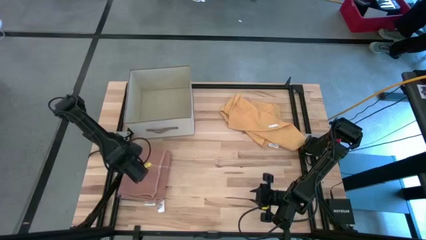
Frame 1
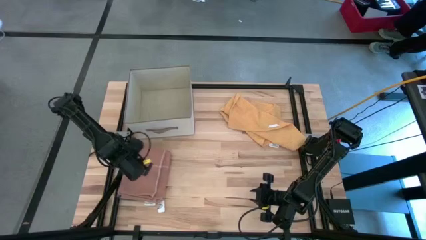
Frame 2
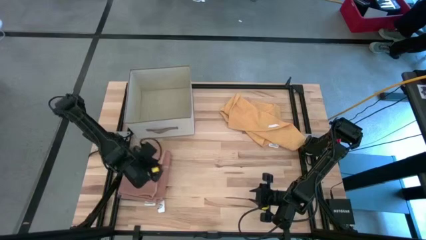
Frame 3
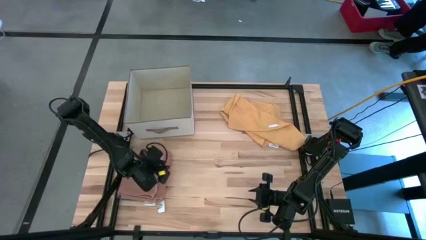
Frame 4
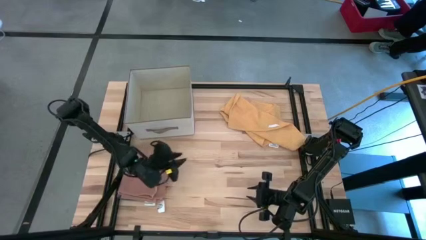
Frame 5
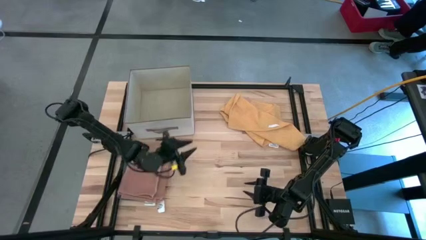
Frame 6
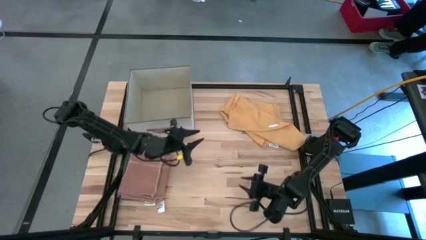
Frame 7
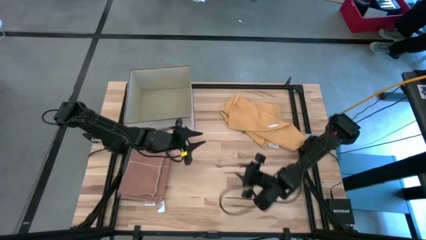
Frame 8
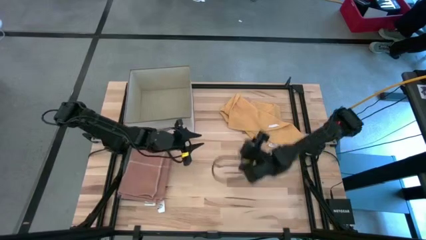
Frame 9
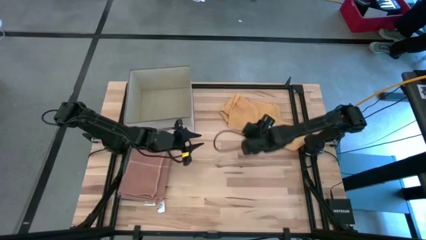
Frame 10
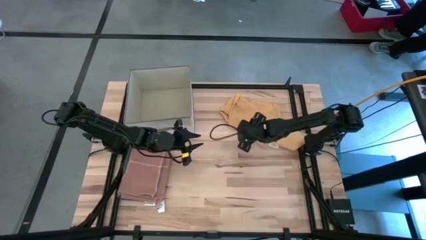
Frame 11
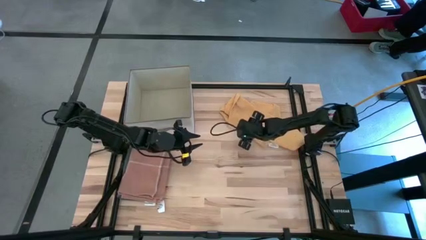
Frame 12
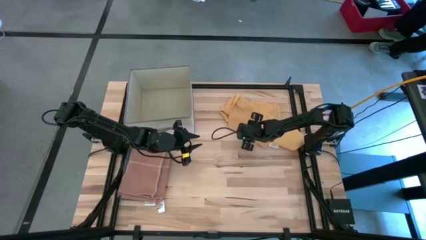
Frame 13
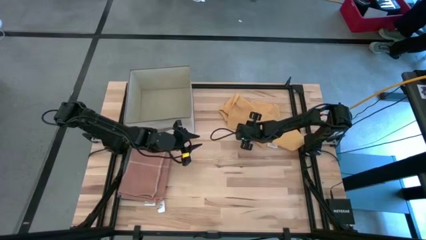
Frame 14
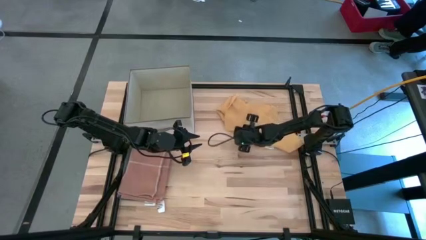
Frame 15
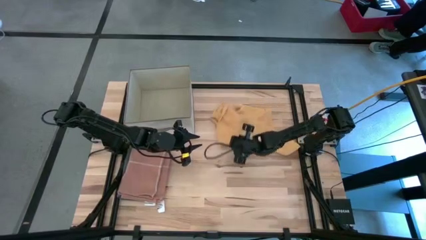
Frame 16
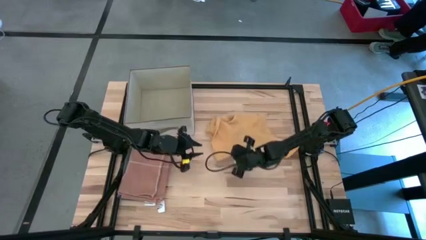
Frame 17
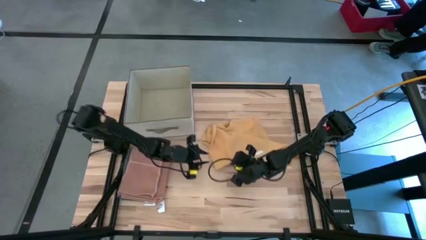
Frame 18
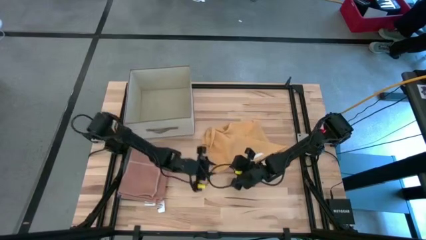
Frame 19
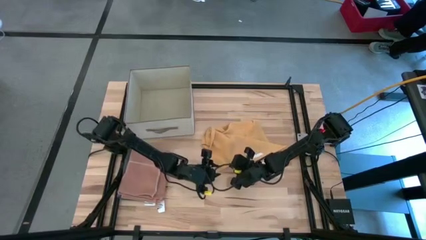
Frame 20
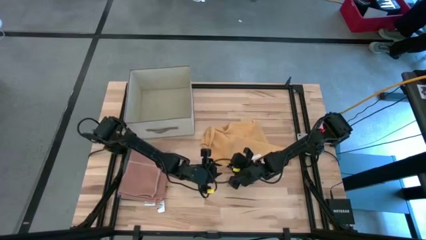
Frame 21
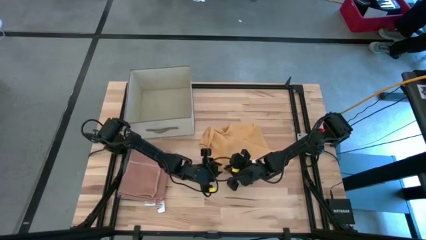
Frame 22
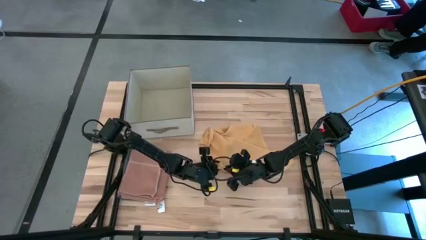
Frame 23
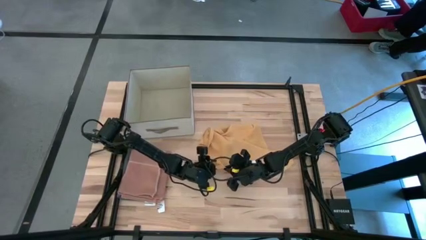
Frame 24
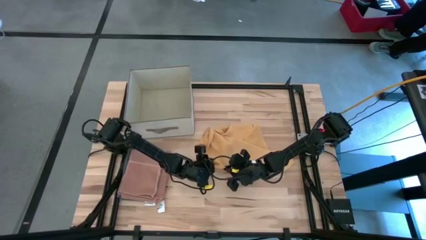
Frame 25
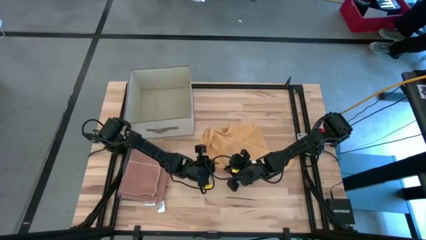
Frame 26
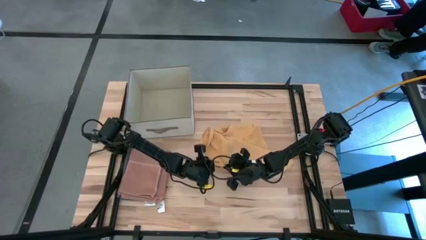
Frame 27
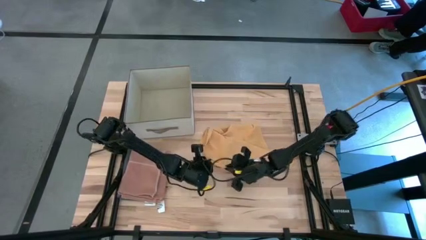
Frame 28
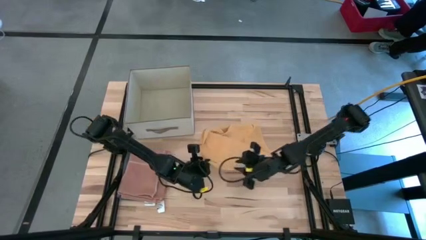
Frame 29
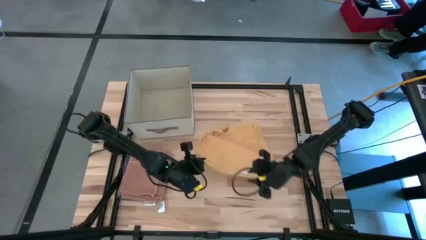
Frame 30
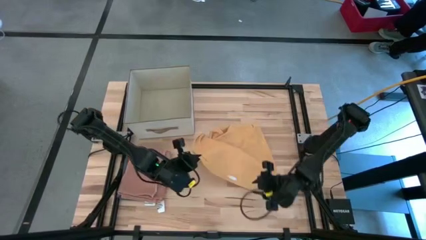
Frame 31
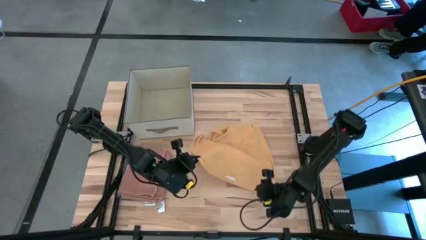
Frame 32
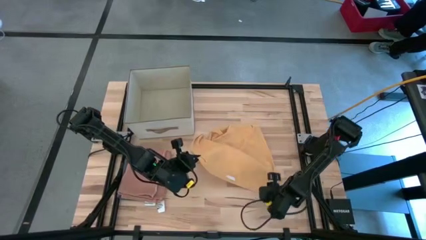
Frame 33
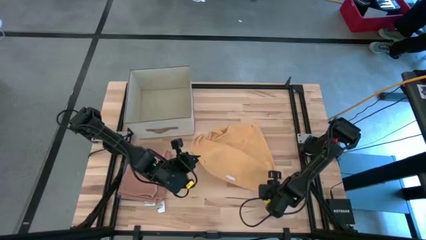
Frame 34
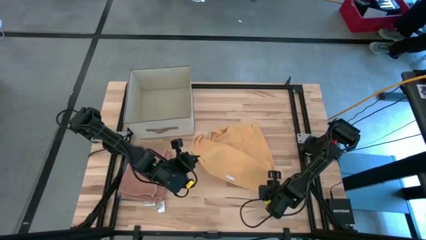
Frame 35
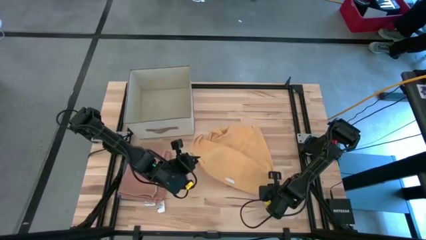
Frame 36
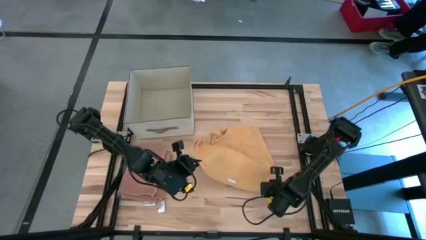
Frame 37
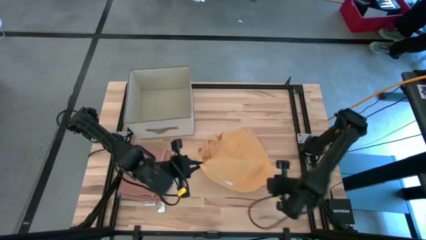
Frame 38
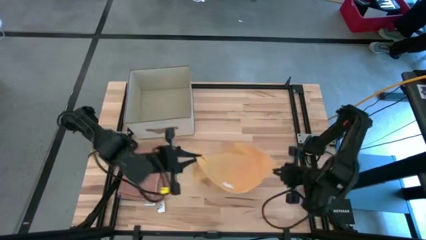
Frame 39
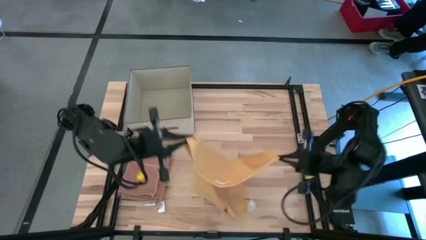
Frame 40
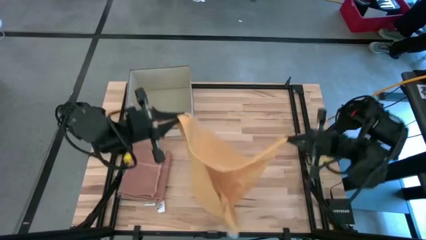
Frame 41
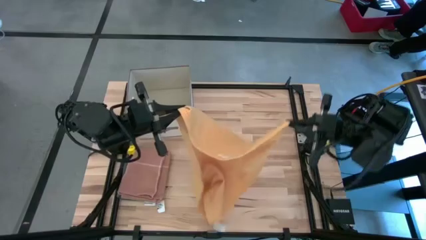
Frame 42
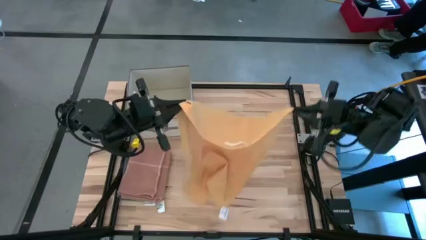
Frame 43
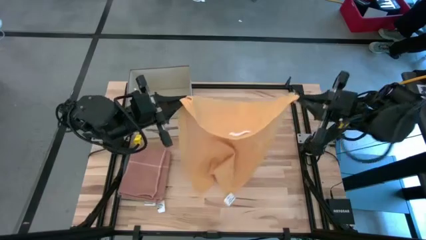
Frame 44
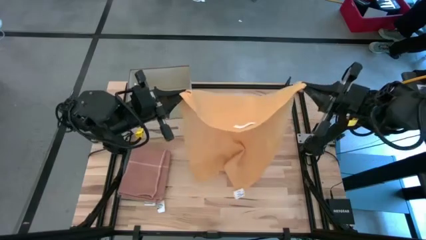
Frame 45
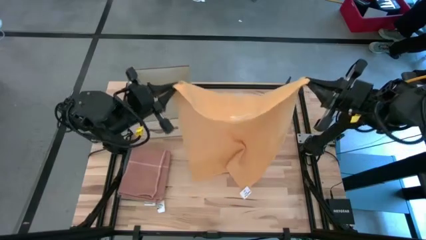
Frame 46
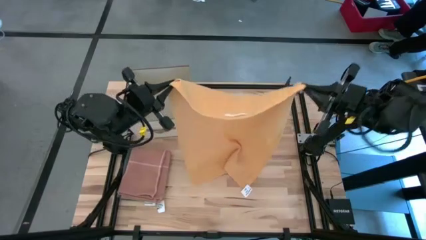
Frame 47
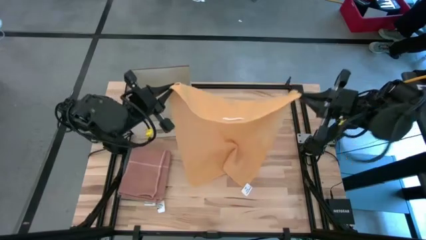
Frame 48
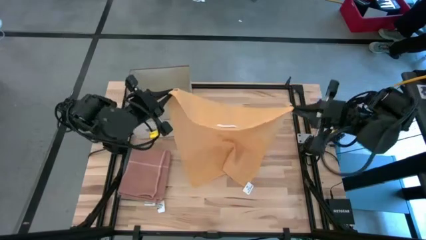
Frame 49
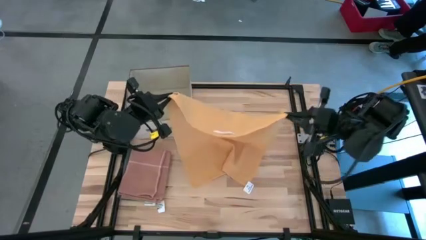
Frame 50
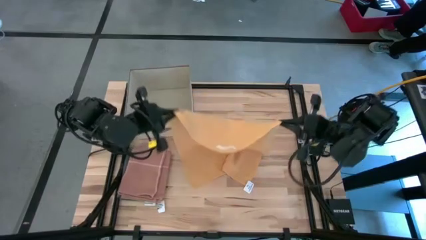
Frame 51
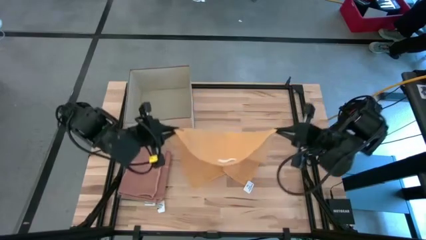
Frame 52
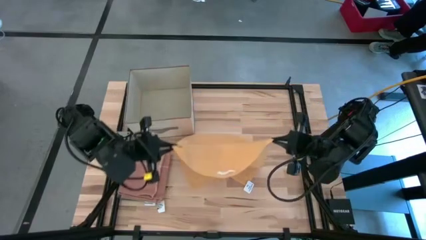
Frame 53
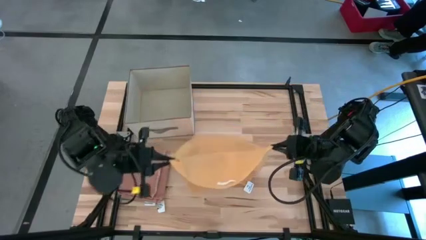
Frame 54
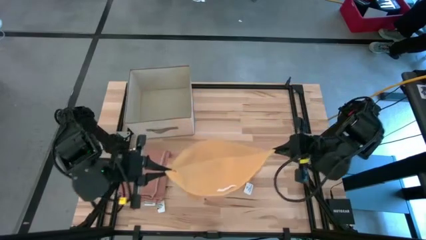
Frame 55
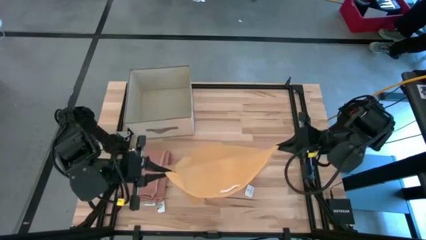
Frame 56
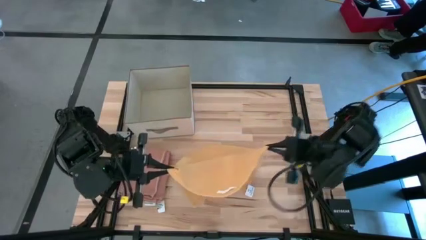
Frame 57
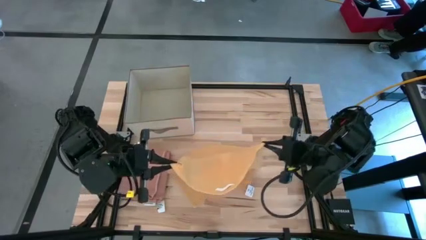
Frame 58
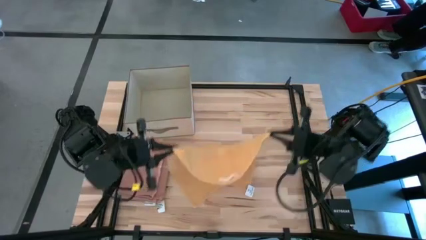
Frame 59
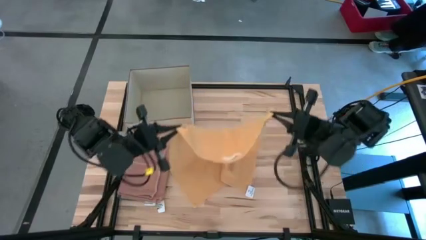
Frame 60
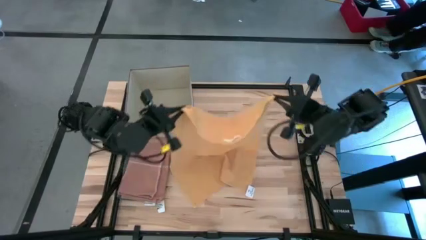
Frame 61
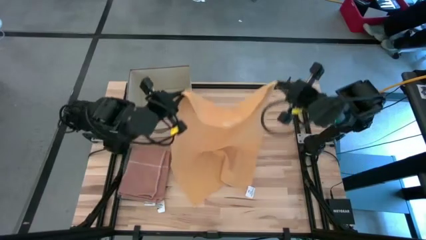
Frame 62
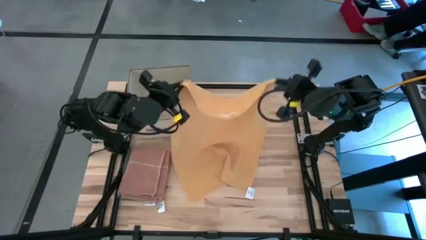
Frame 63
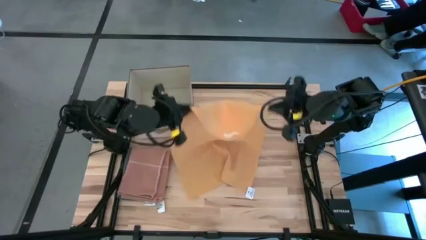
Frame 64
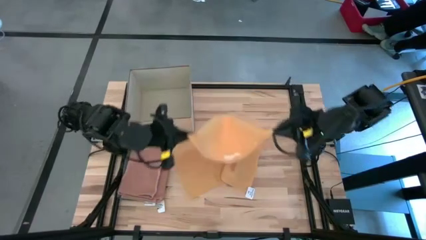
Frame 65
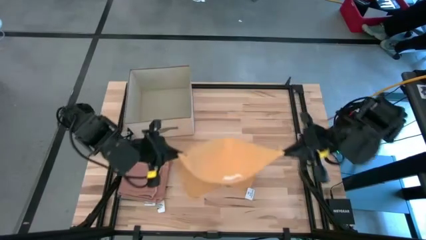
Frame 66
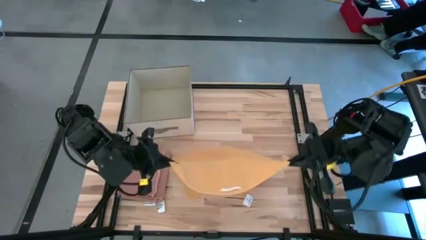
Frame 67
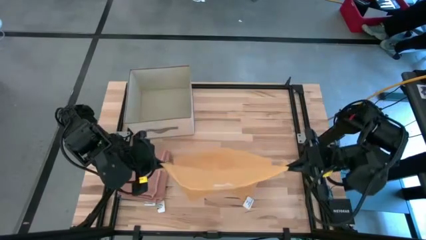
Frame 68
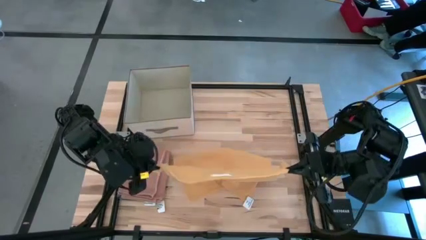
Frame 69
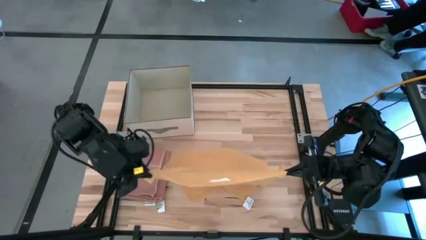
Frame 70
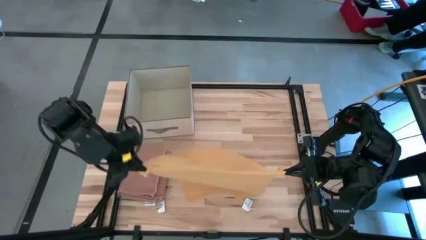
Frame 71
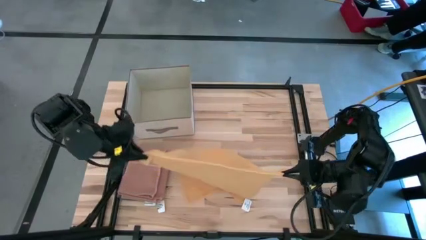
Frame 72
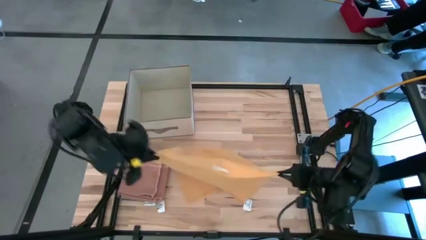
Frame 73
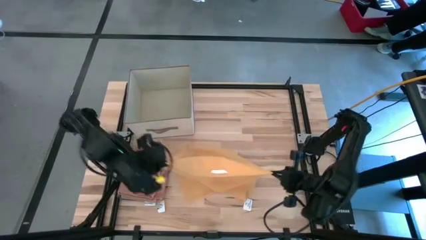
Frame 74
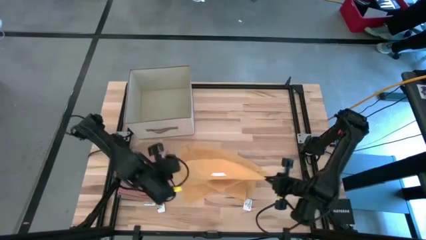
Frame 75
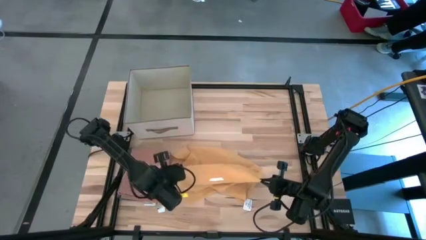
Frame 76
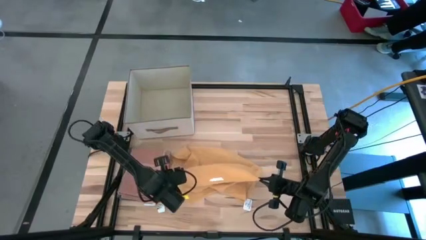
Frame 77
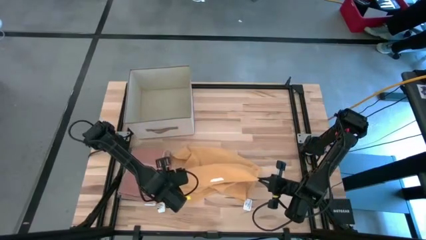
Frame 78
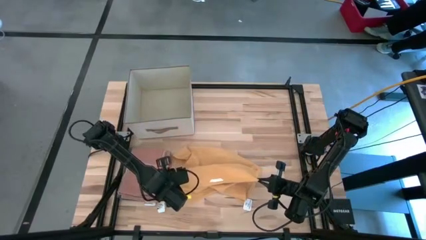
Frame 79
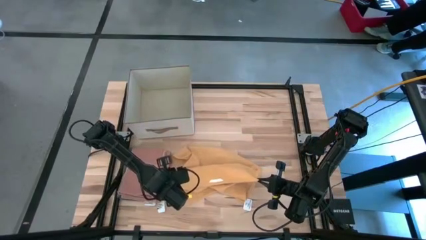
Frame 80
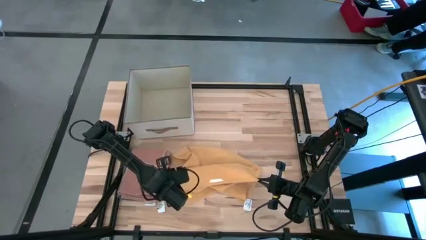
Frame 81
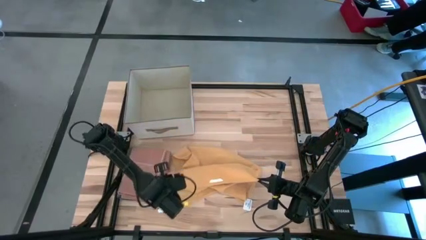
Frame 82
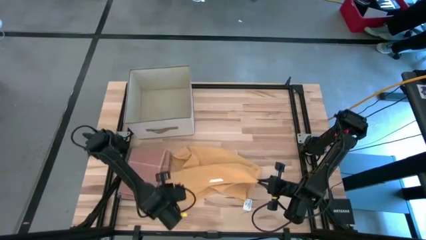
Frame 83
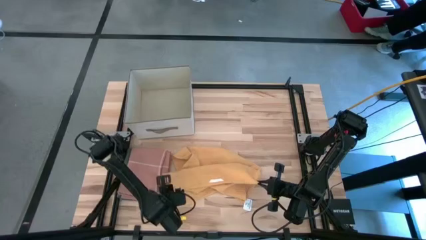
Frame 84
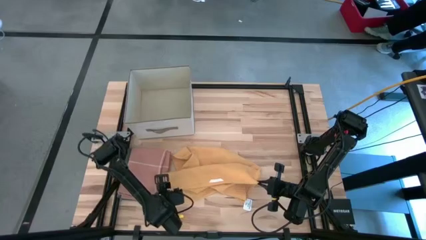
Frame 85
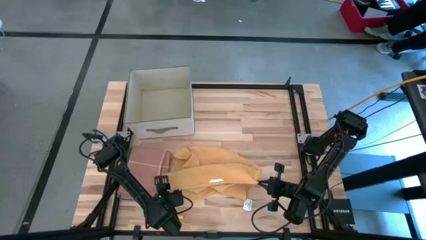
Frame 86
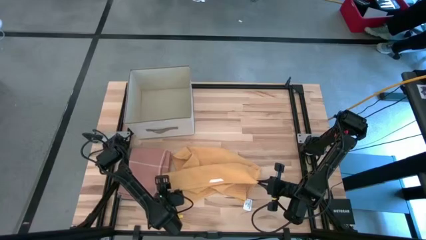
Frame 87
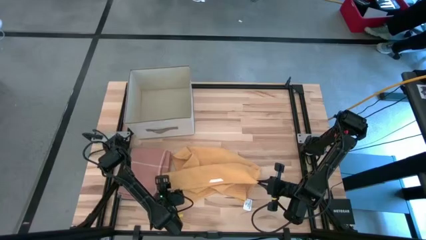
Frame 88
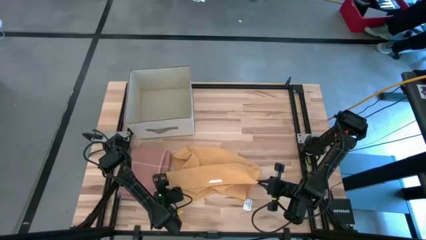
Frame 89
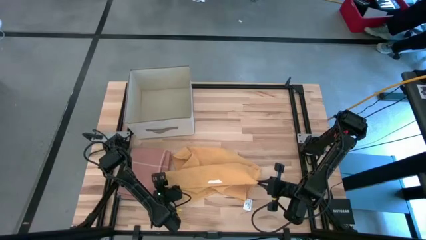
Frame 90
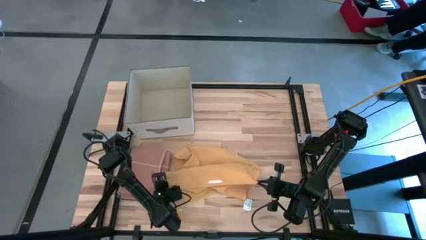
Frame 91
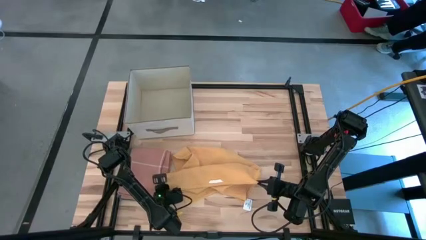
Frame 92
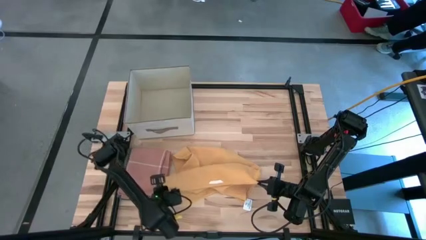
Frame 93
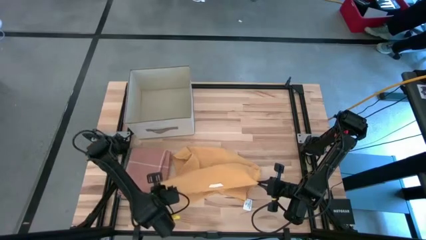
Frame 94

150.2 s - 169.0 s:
Task: Fold towel
Fold the yellow towel
